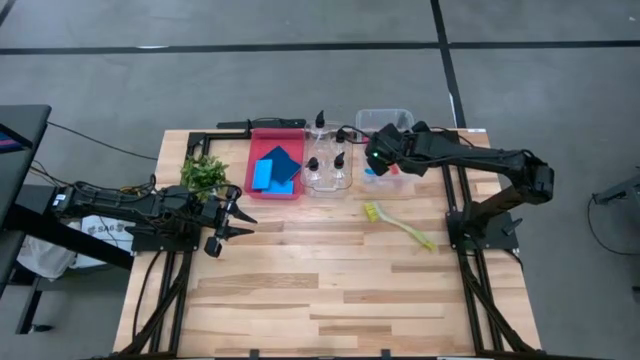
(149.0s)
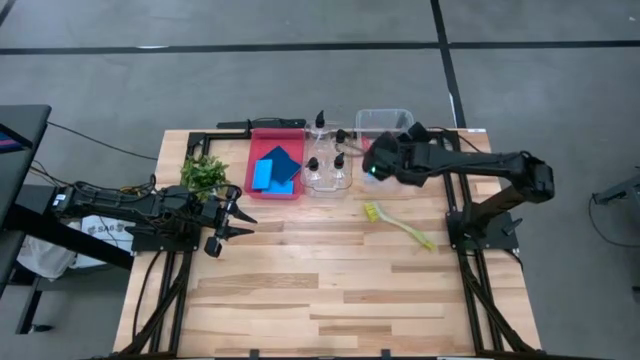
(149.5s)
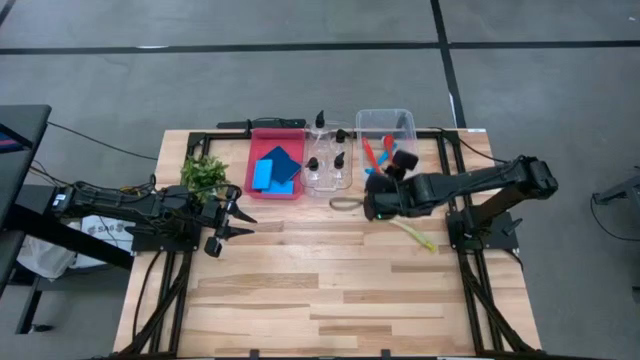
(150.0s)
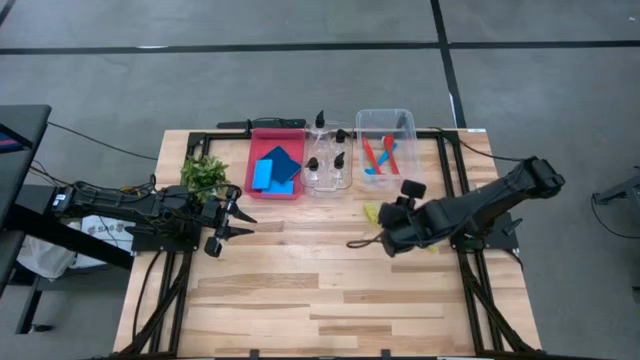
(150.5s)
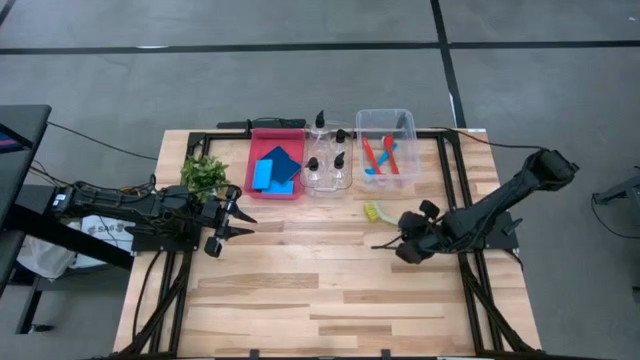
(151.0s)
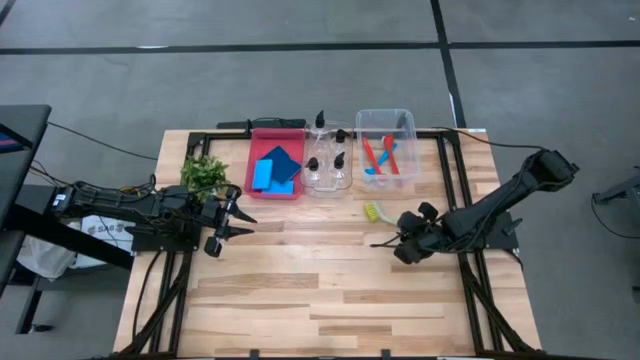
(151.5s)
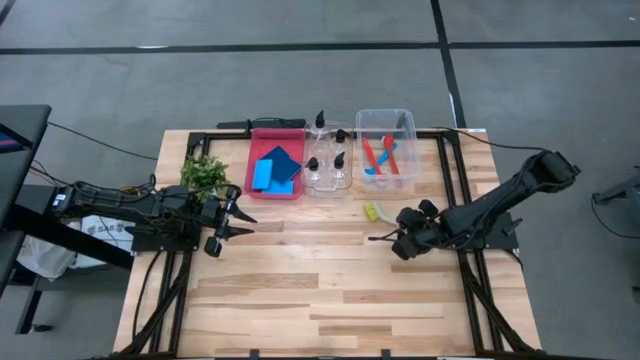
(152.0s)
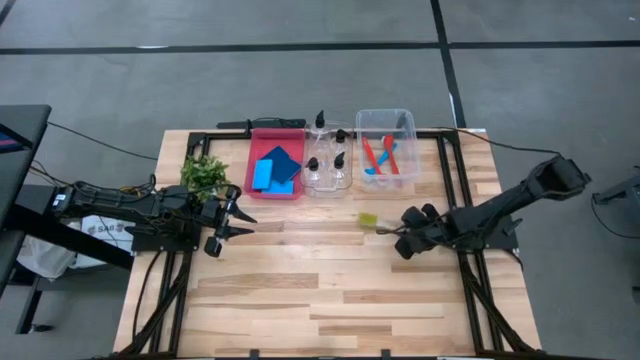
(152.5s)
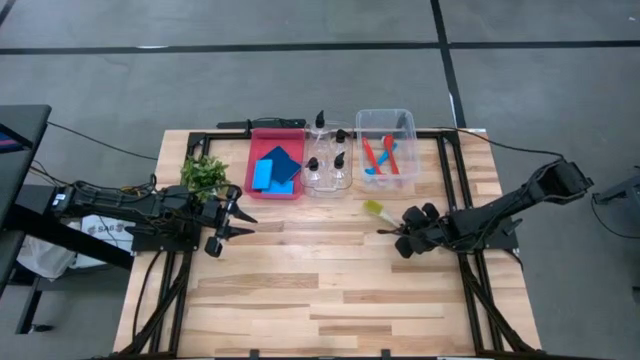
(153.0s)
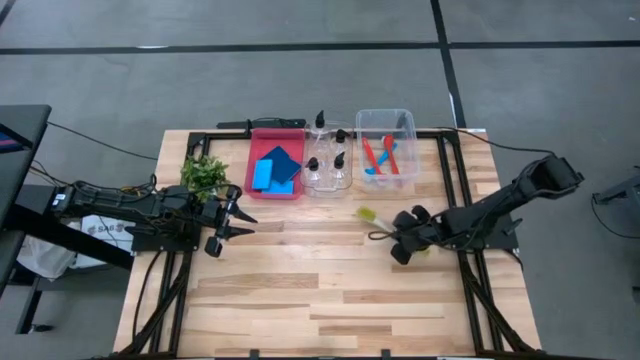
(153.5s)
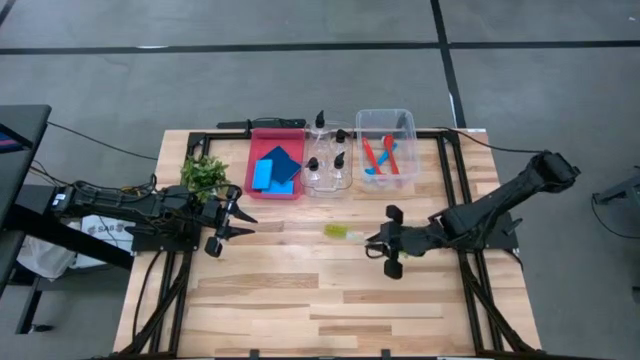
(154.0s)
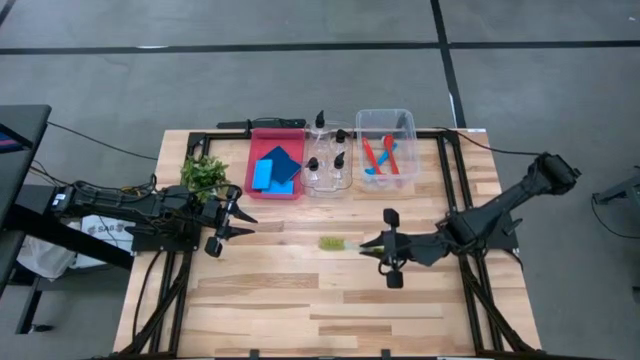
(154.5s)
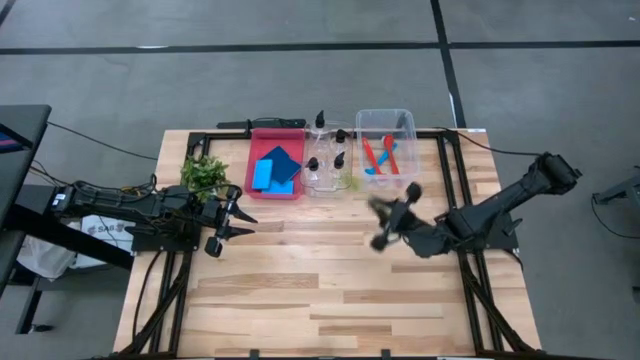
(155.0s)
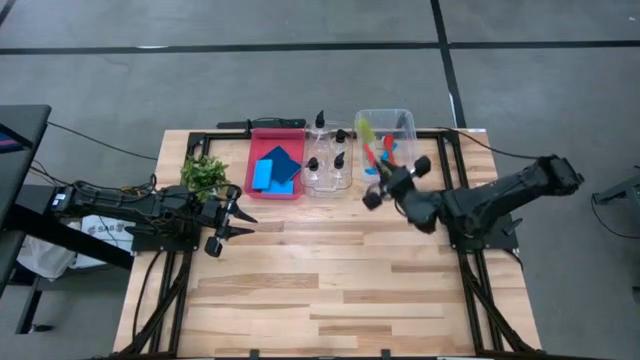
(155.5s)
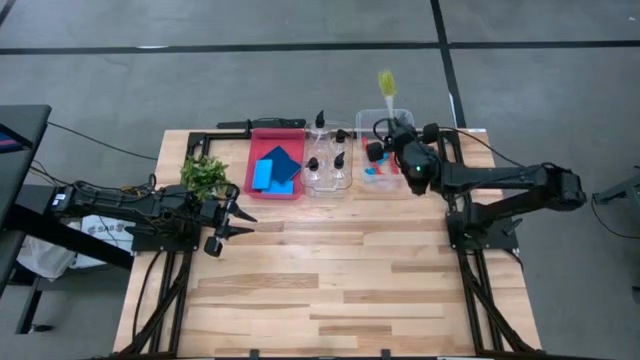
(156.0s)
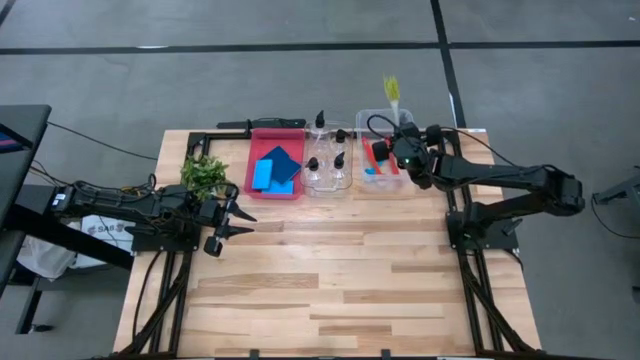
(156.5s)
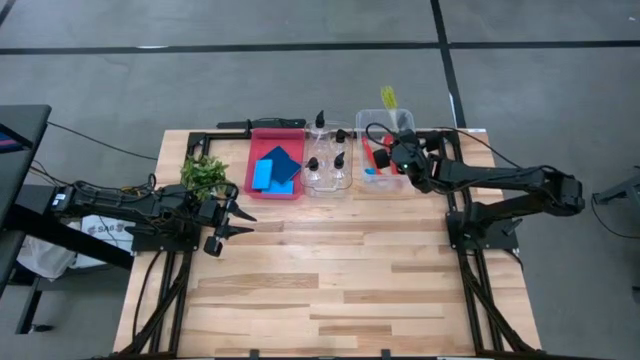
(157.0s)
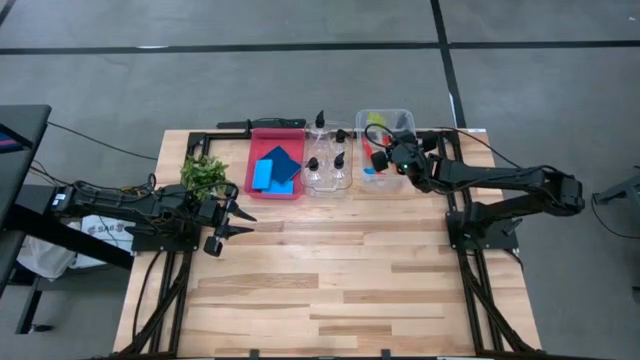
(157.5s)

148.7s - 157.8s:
Task: Pick & Place Kitchen Sink Supplies
Put the green dish brush into the right transparent bin

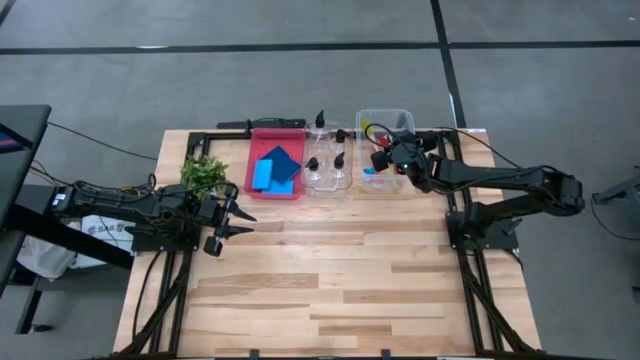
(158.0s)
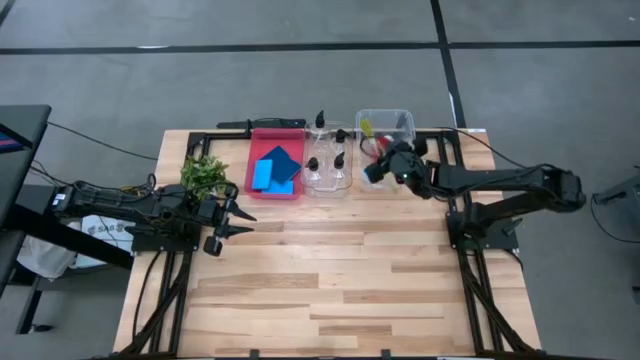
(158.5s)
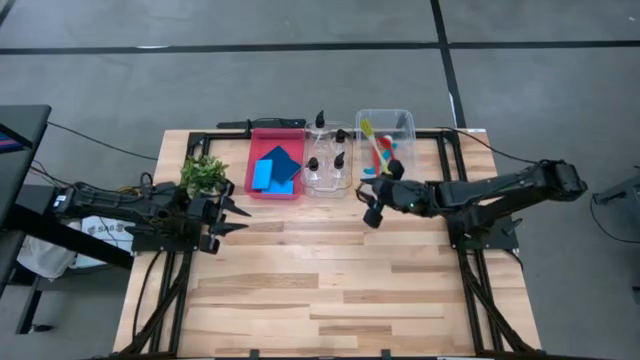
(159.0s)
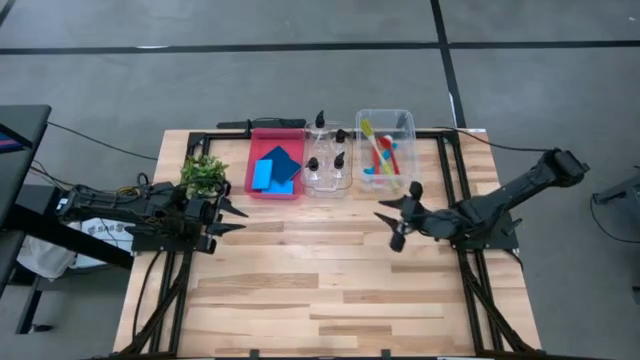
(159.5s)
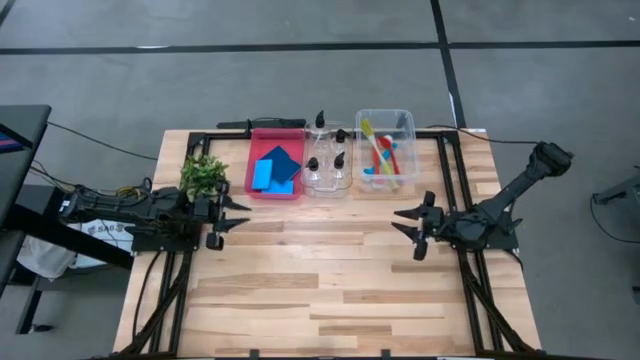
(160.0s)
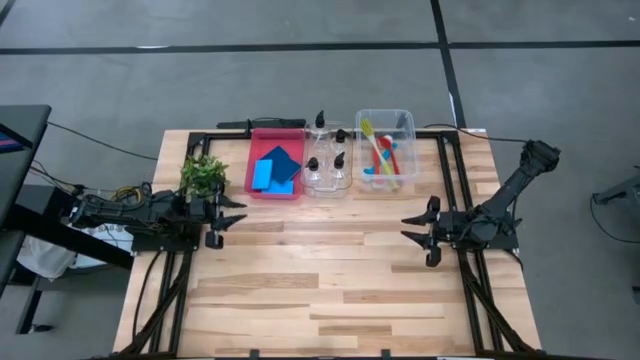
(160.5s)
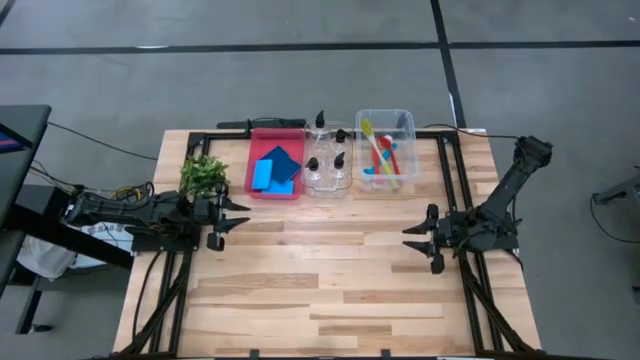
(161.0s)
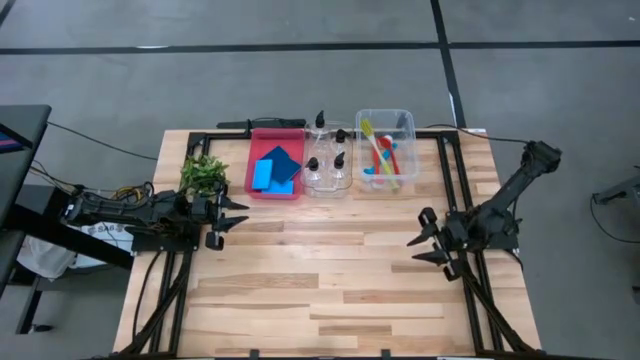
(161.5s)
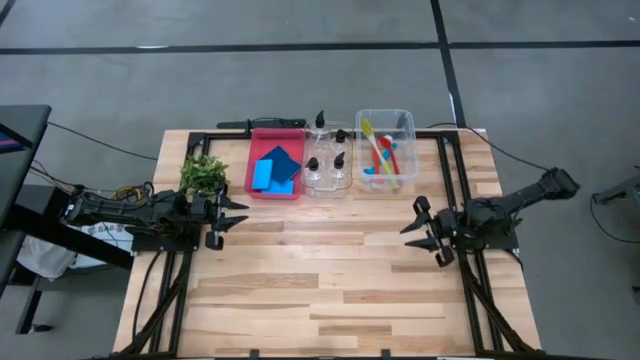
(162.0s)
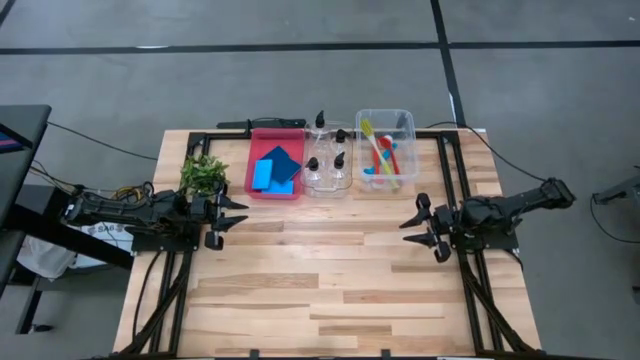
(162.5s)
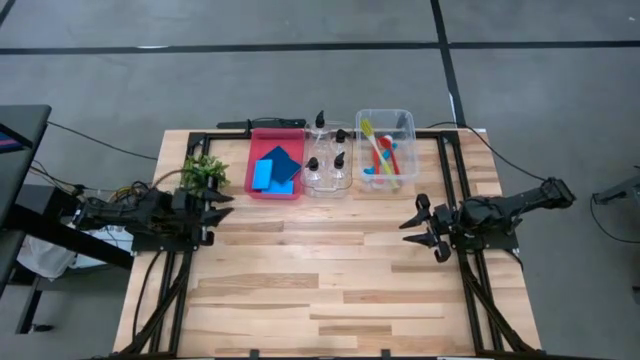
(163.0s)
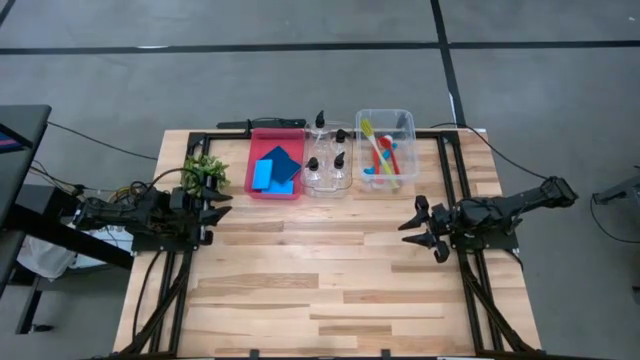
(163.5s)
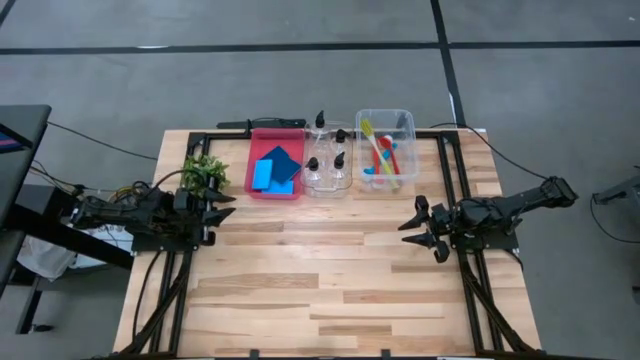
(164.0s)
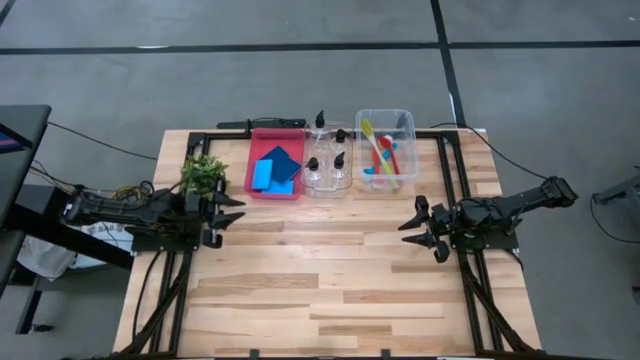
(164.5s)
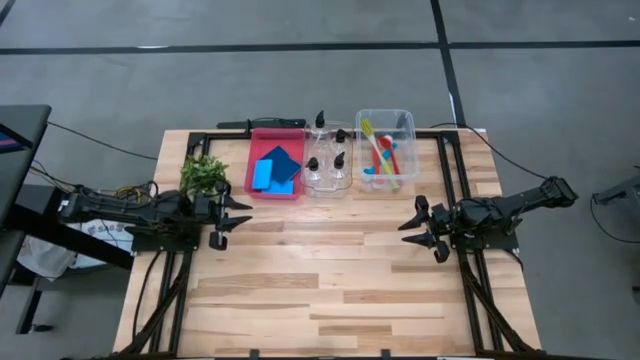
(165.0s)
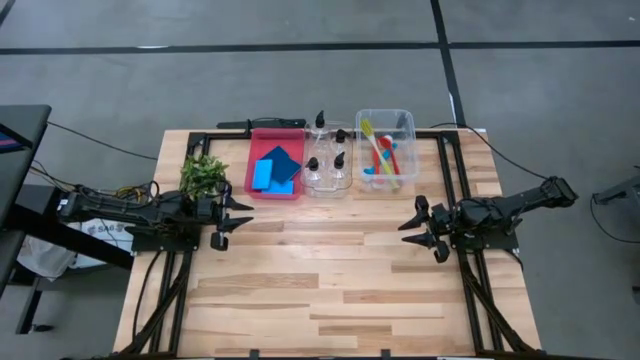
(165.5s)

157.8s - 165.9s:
Return to Home Position

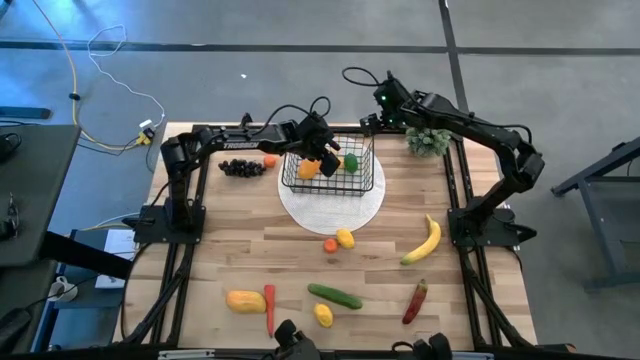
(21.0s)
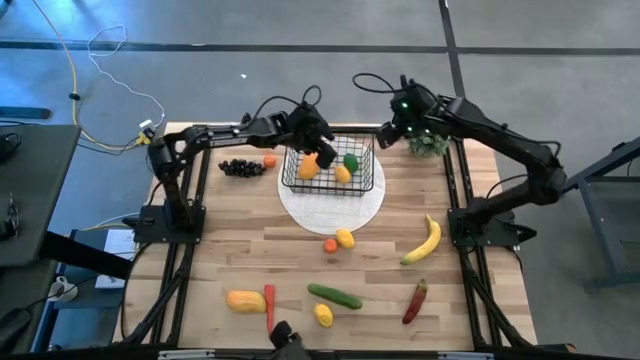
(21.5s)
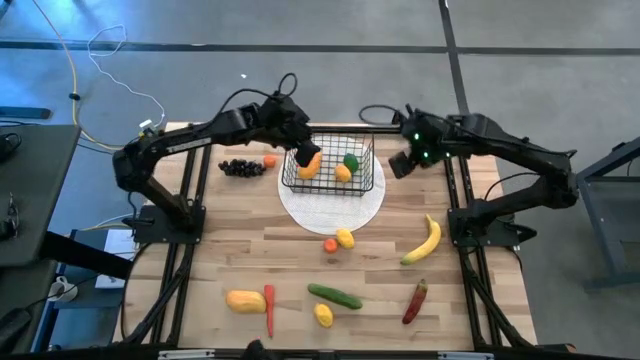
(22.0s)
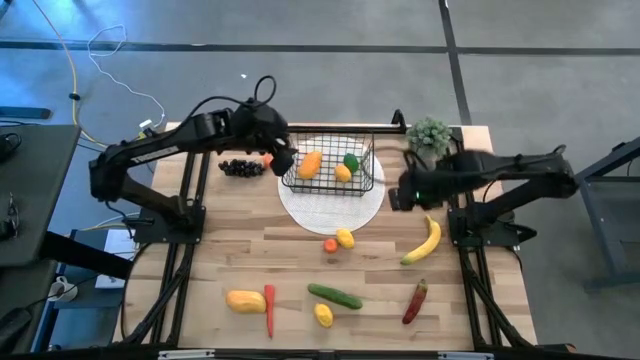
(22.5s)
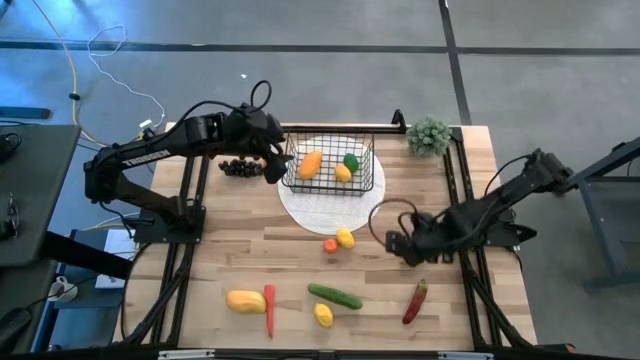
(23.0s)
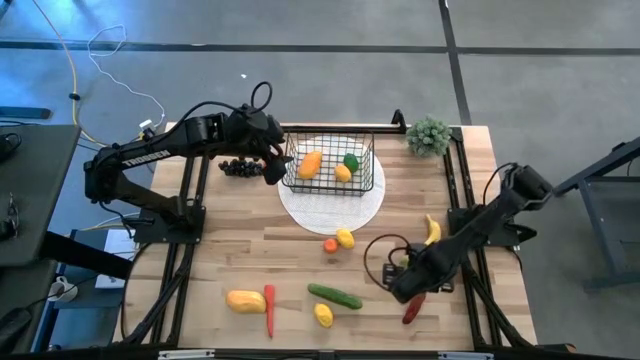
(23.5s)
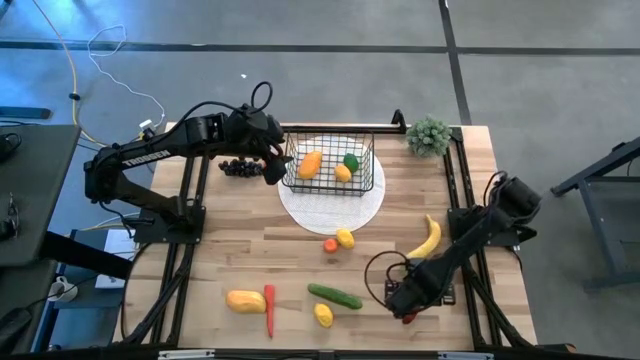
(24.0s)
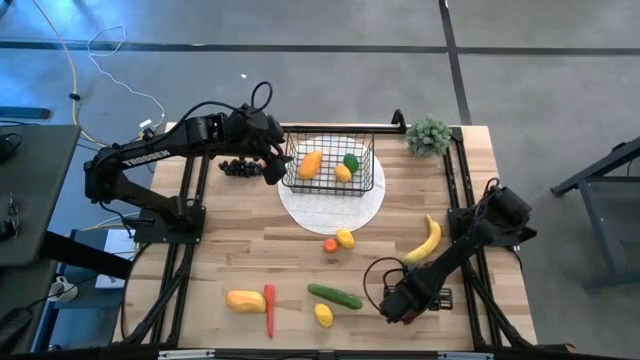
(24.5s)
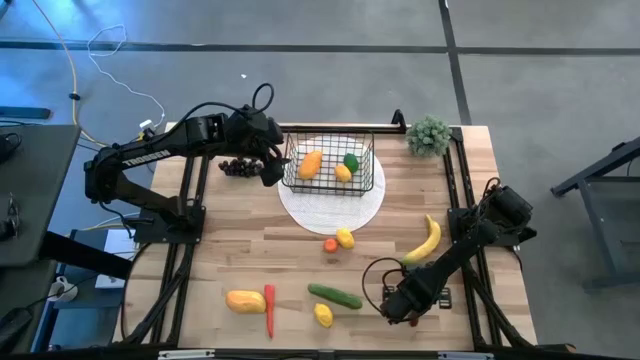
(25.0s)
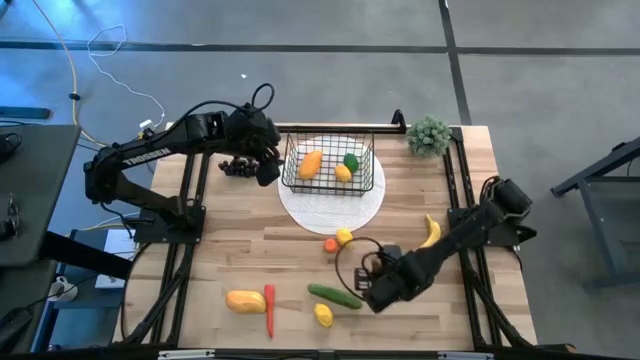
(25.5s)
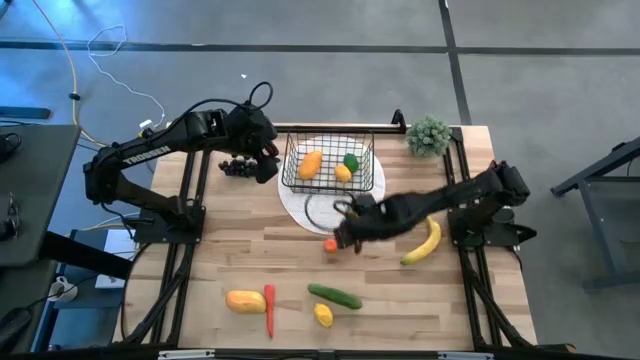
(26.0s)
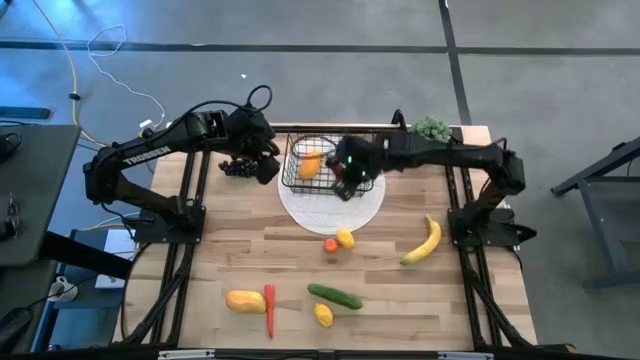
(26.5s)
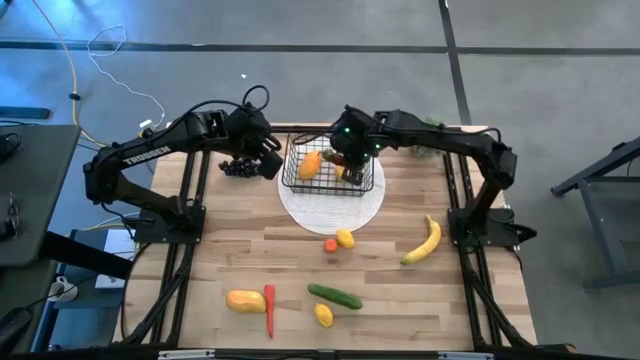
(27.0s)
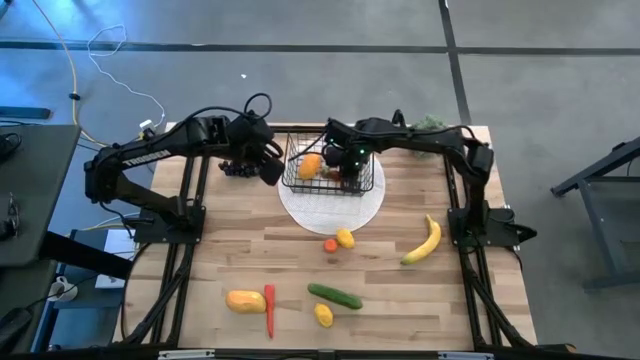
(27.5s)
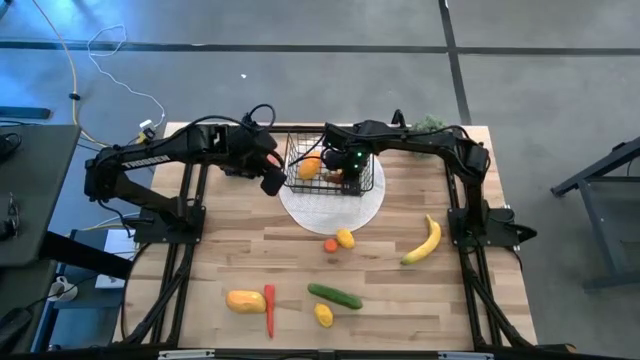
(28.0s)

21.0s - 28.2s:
Task: Build produce basket
Put the red chili pepper into the wire basket
